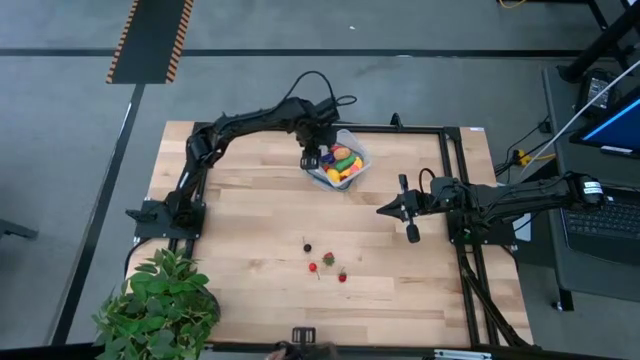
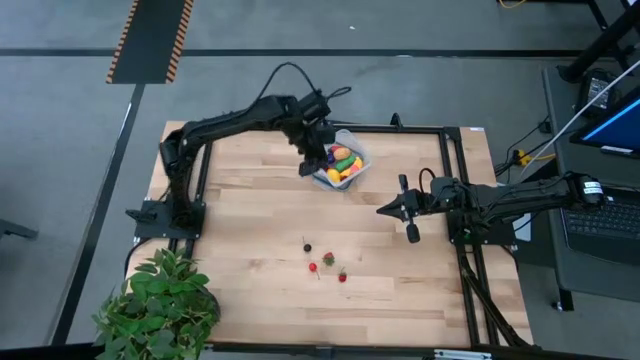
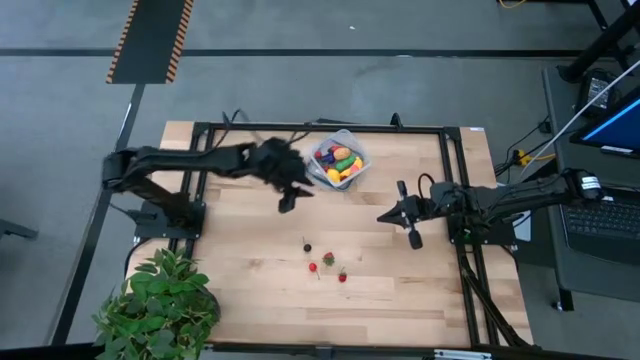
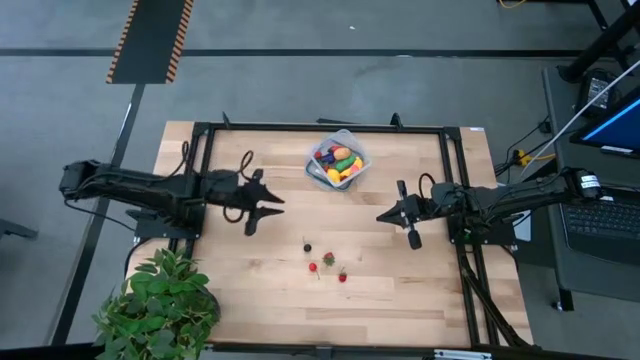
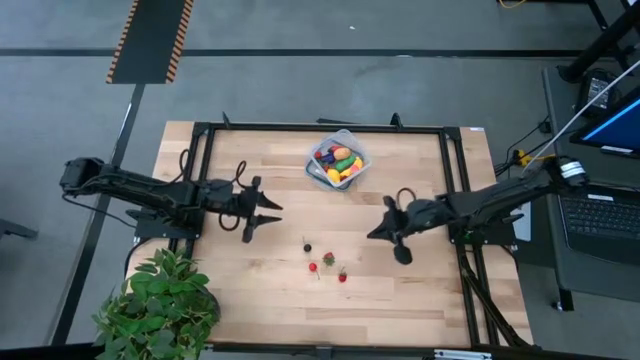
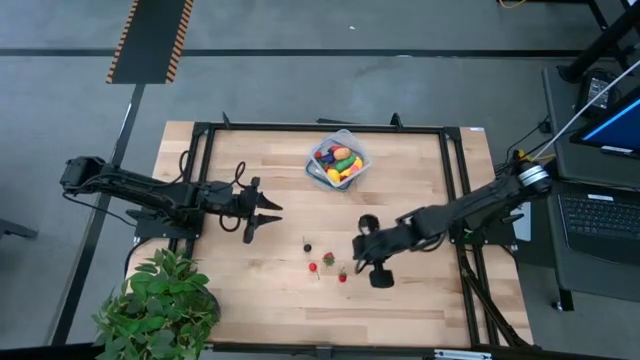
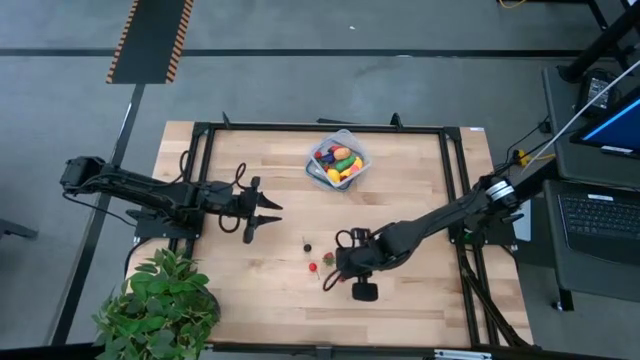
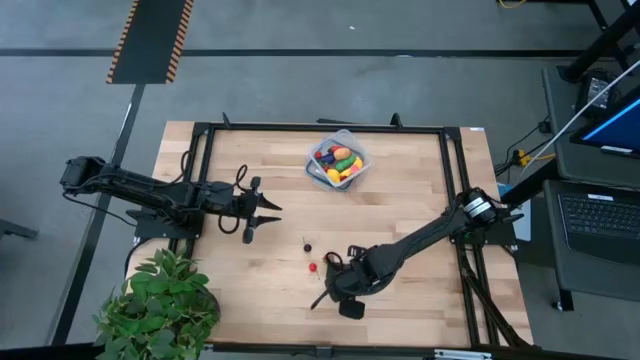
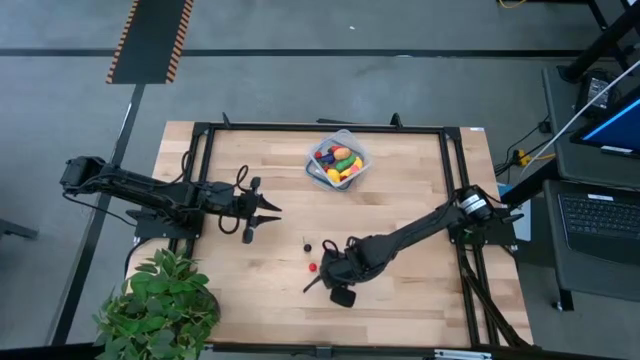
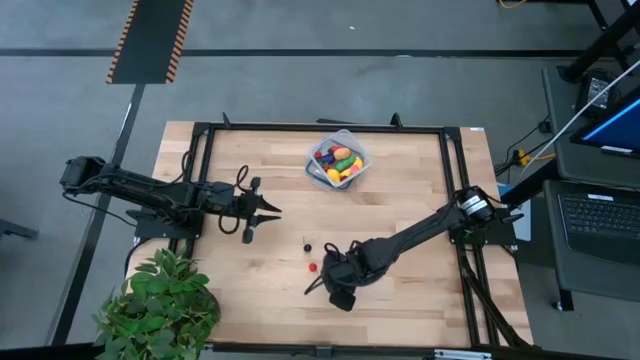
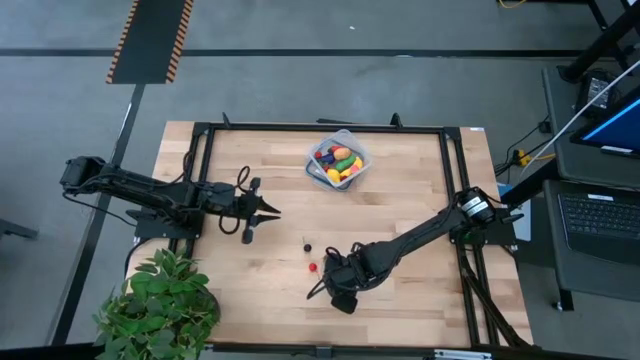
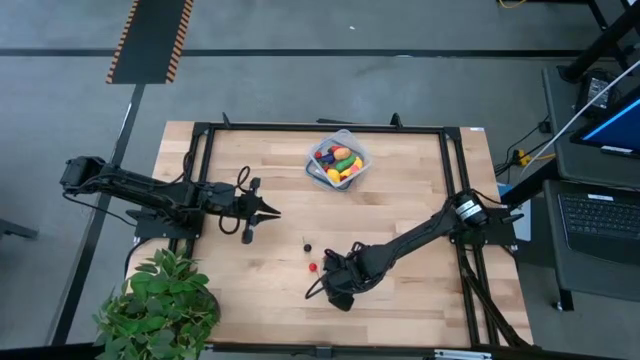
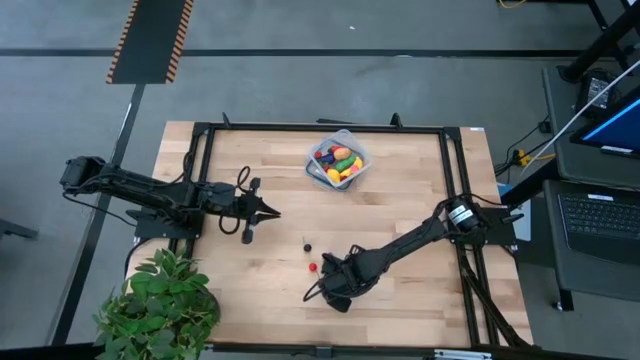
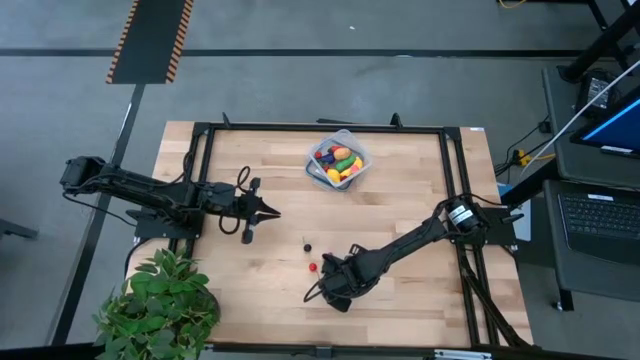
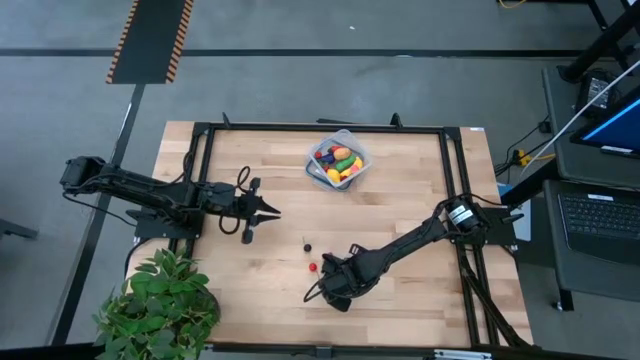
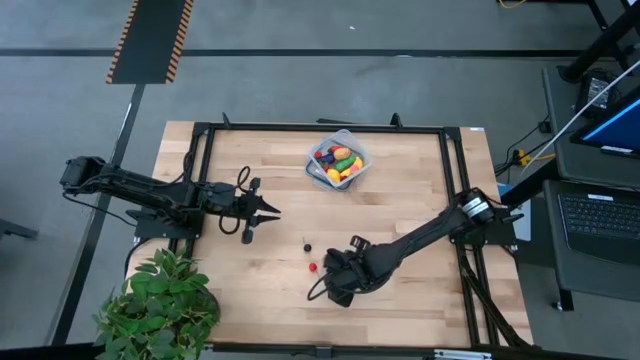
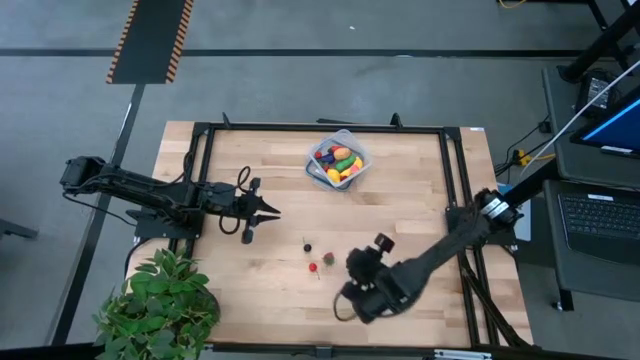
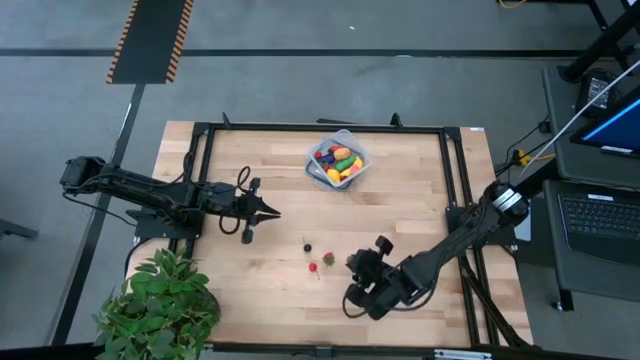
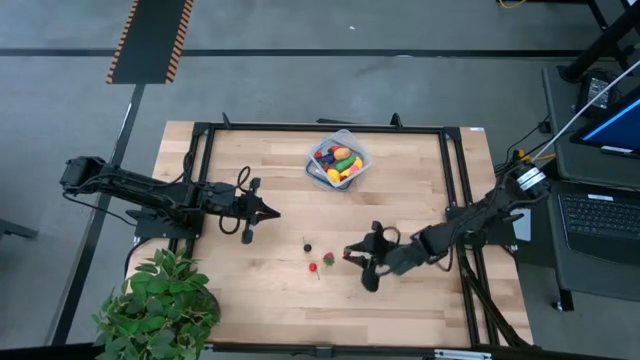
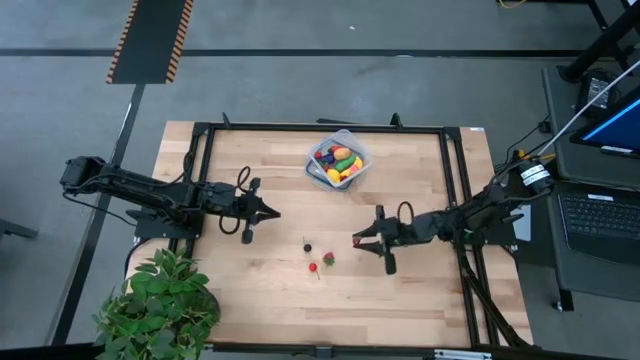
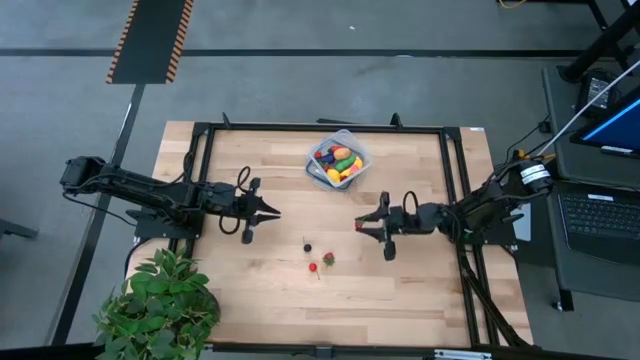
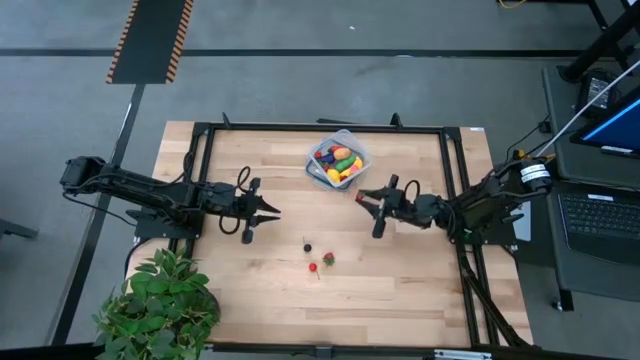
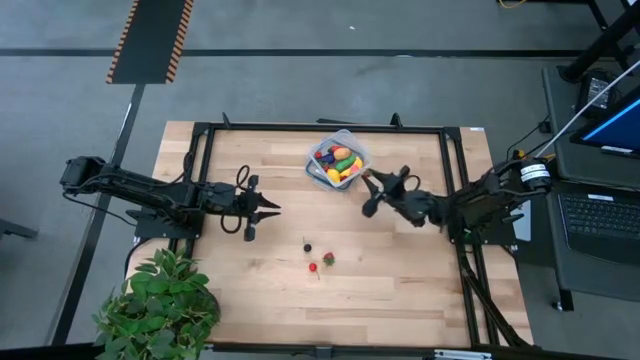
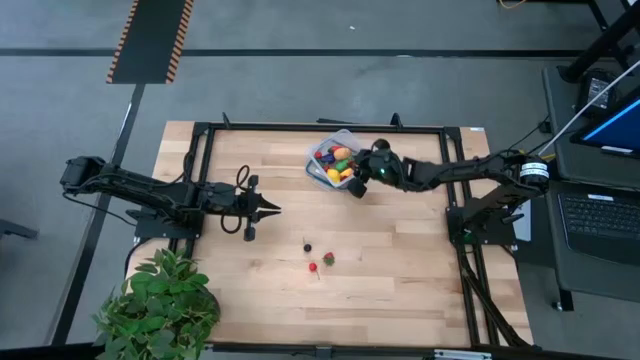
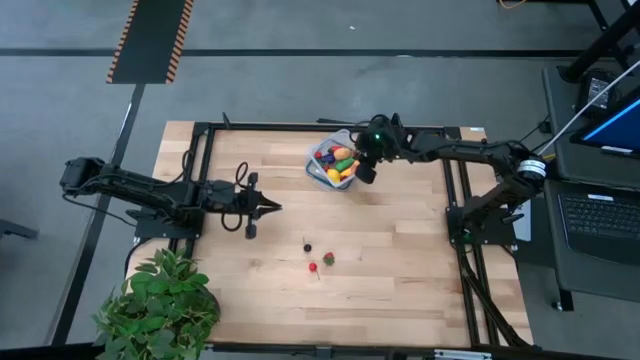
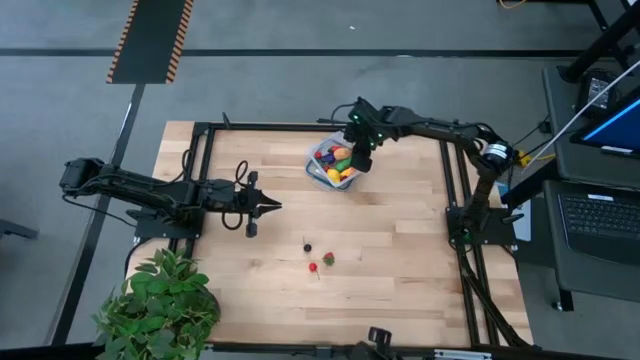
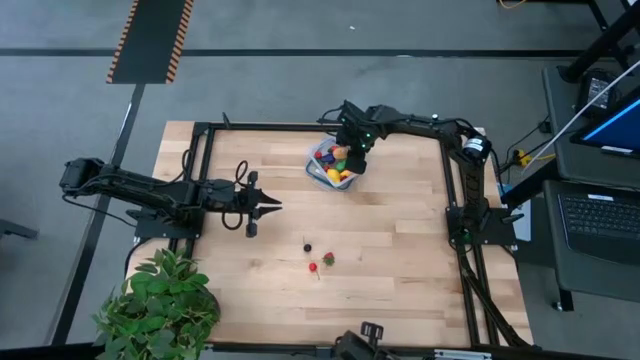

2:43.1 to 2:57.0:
Task: Pick and placing Produce into tupperware
Put the bottom red strawberry into the transparent container

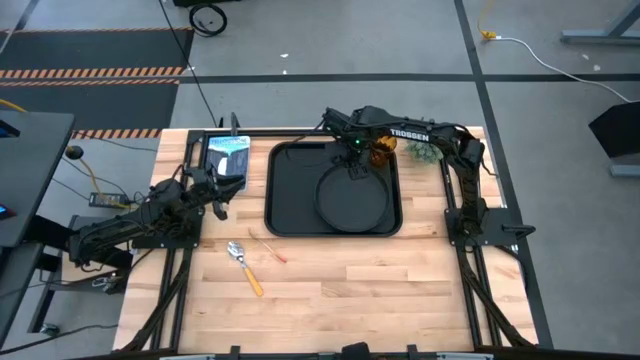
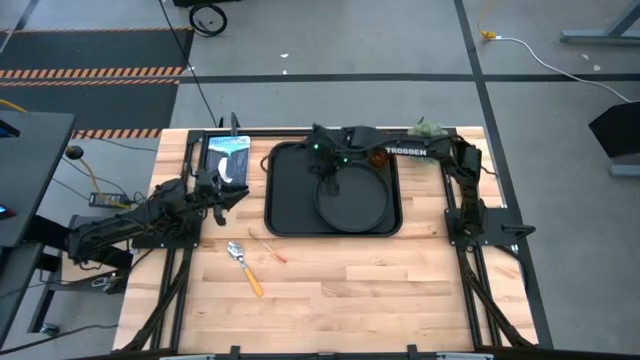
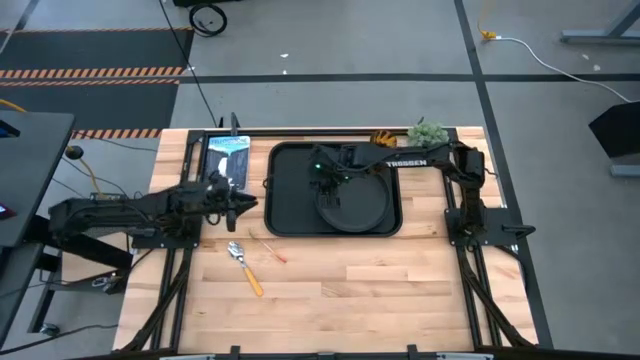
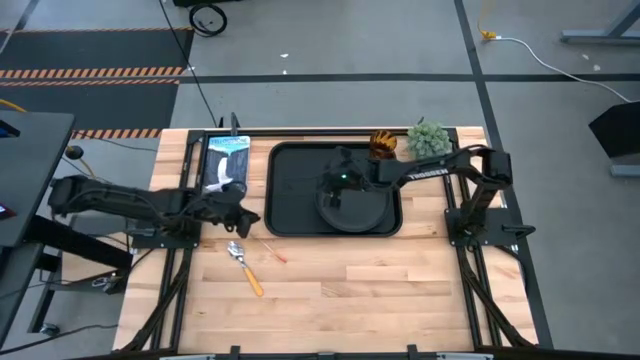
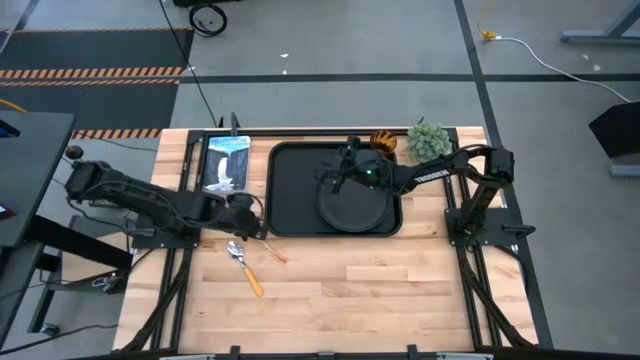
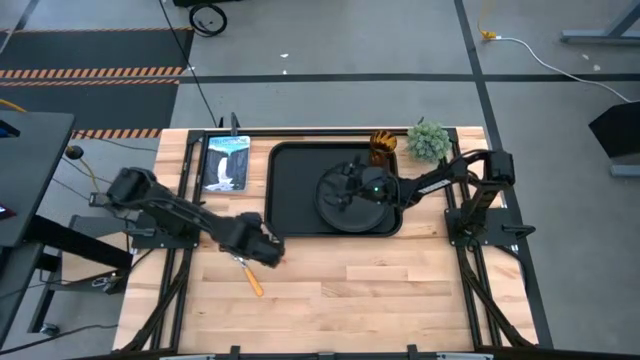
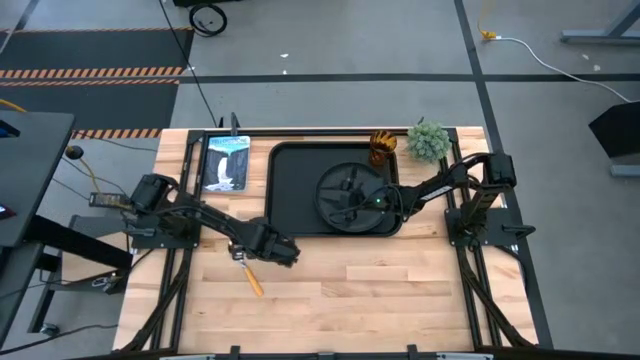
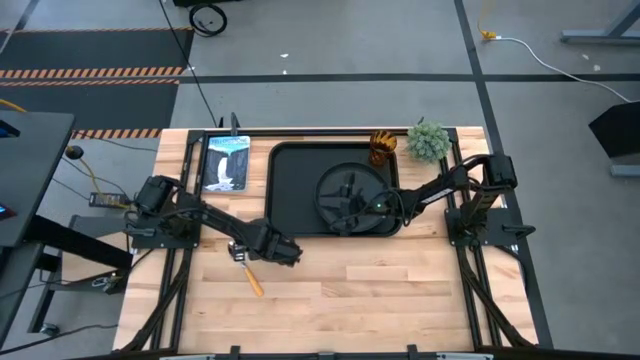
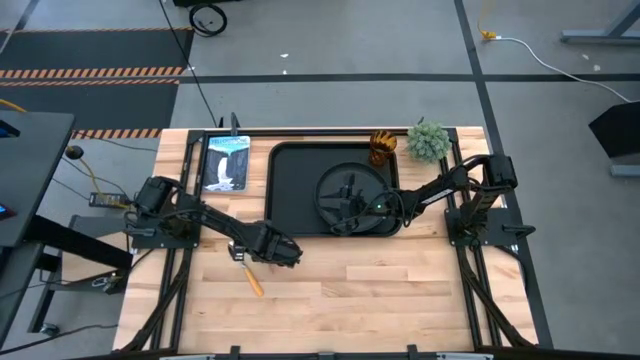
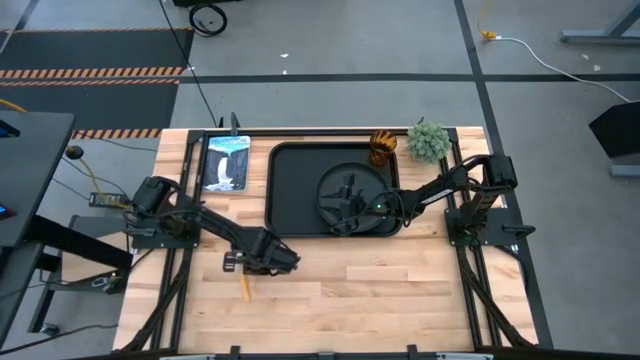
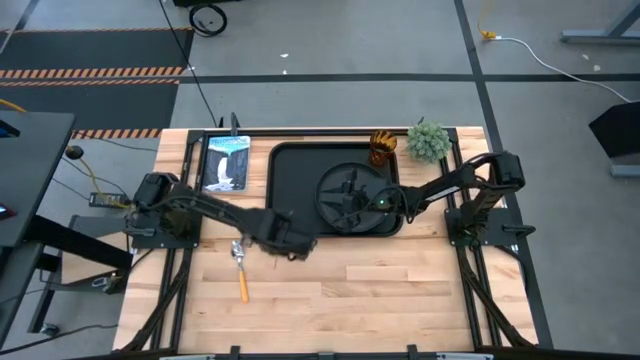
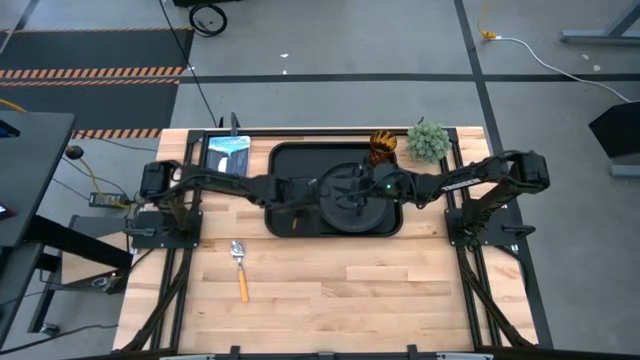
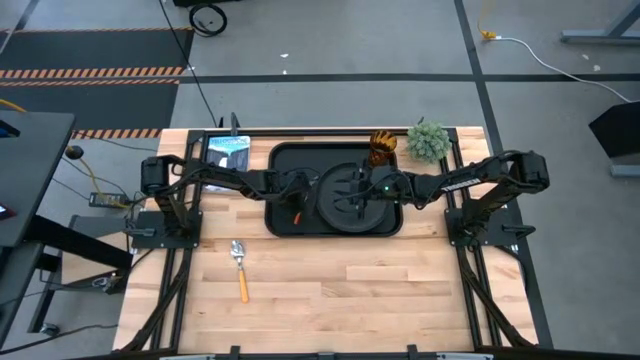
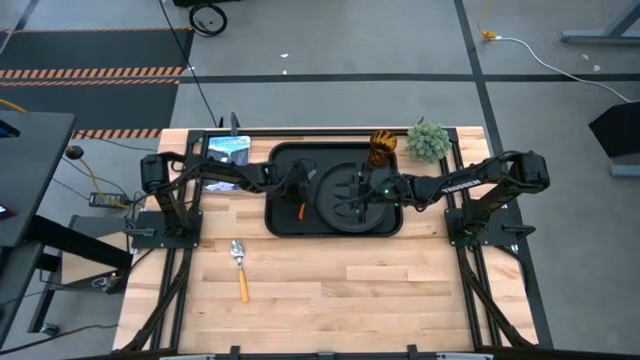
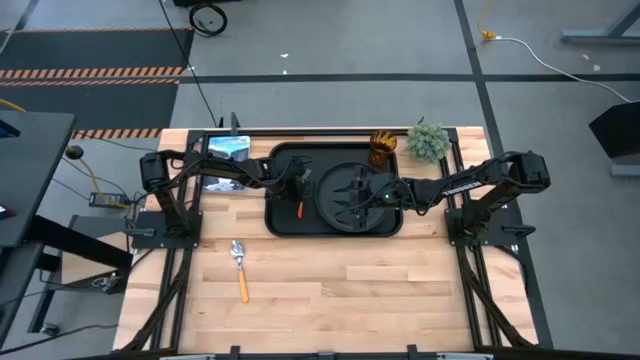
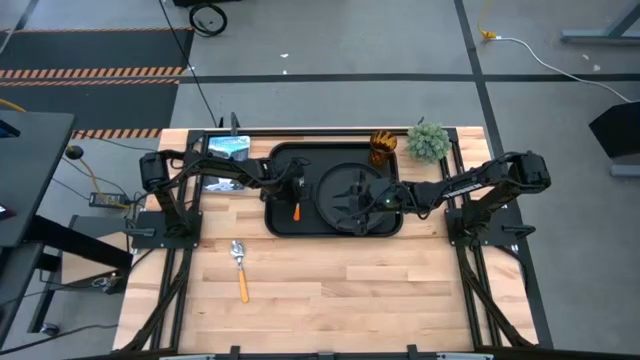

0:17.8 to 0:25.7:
Task: Pick and place plate/cup/fork/spoon on tray
Put the orange fork to the left of the black plate on the black tray
